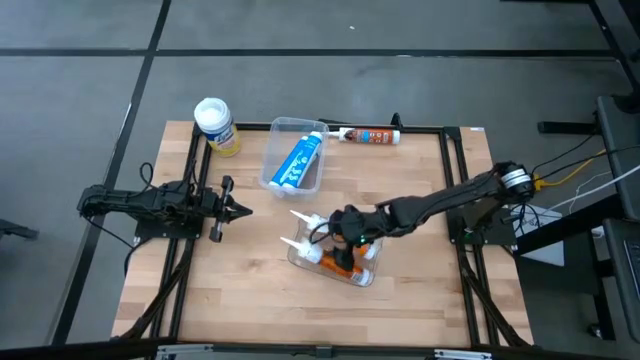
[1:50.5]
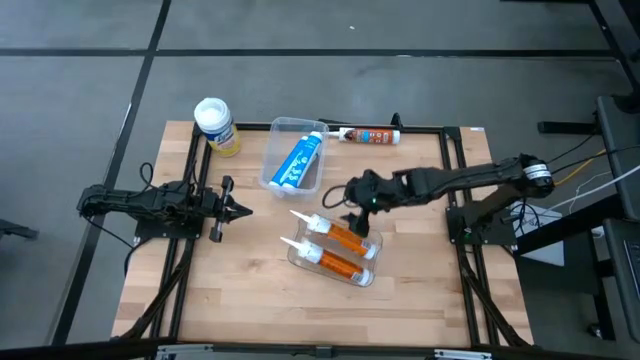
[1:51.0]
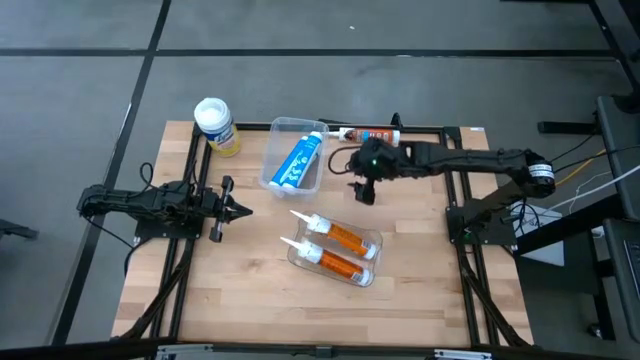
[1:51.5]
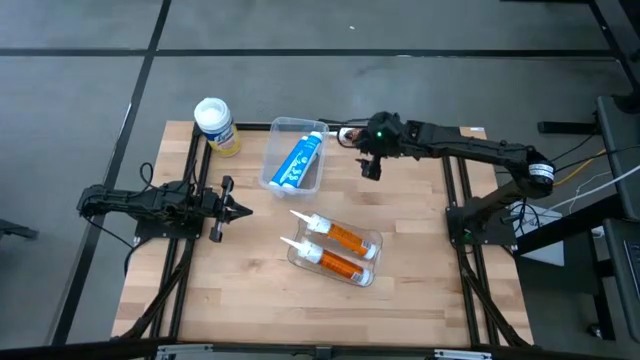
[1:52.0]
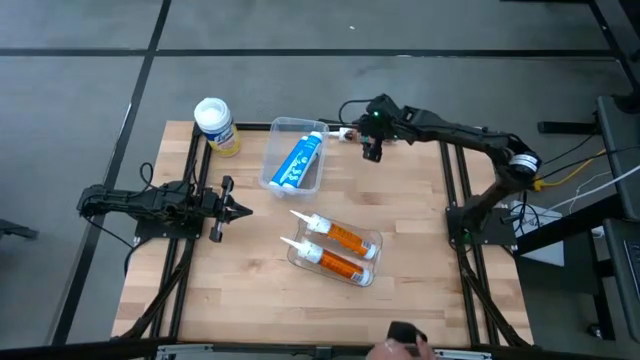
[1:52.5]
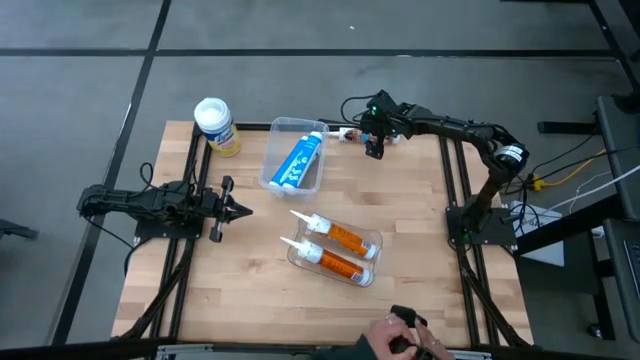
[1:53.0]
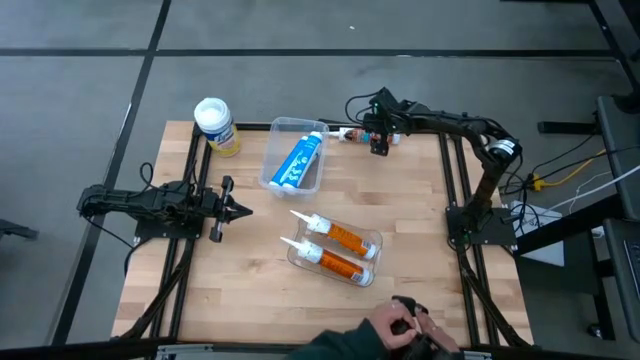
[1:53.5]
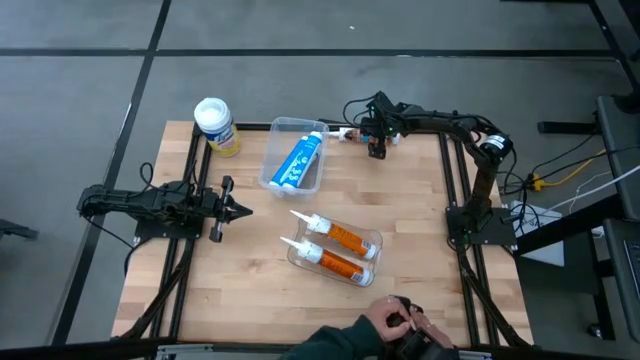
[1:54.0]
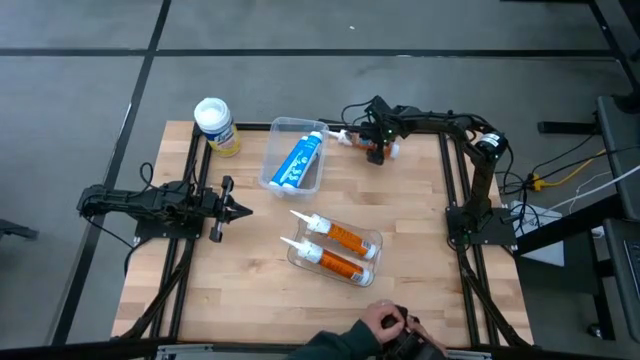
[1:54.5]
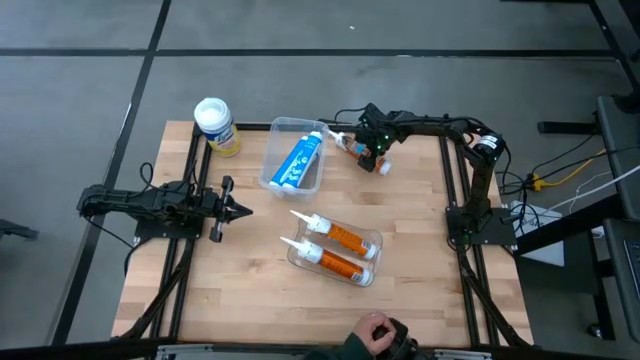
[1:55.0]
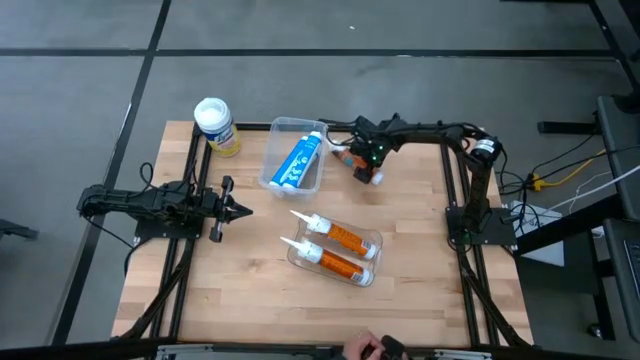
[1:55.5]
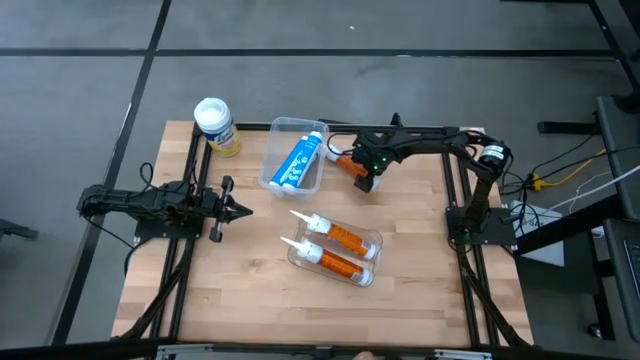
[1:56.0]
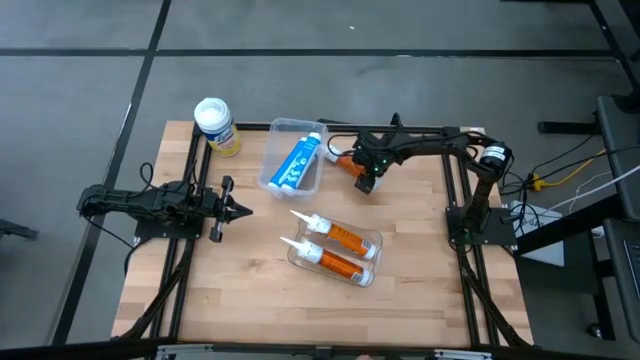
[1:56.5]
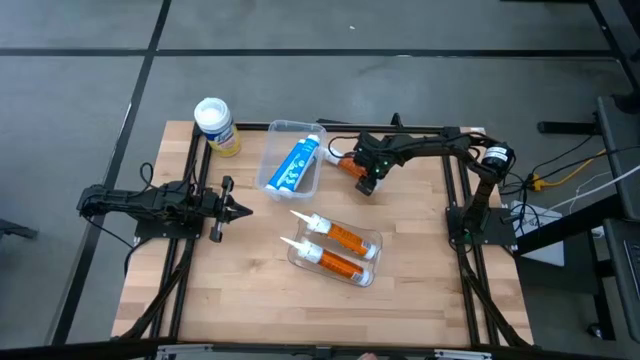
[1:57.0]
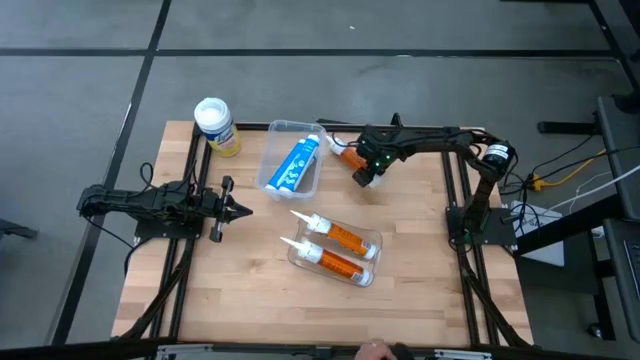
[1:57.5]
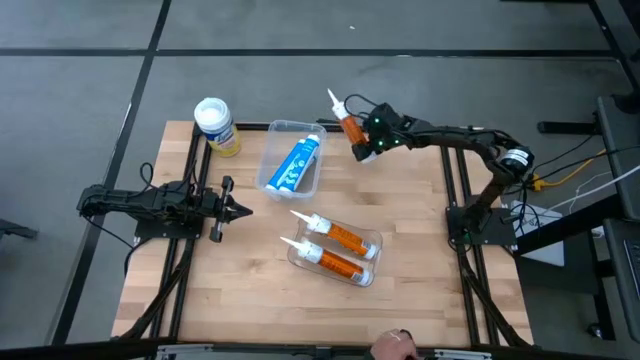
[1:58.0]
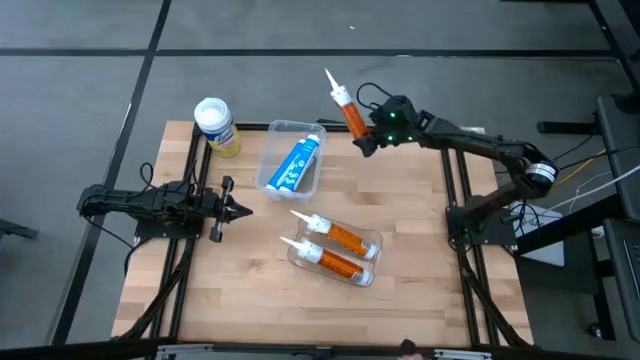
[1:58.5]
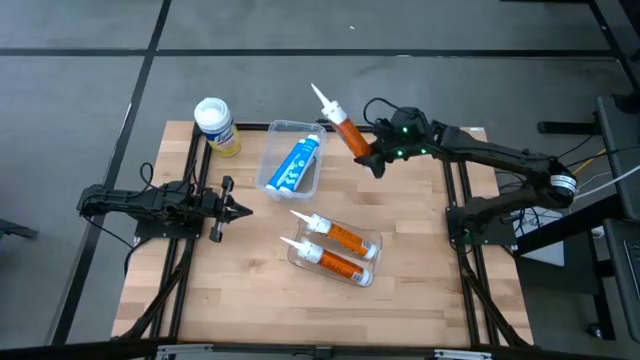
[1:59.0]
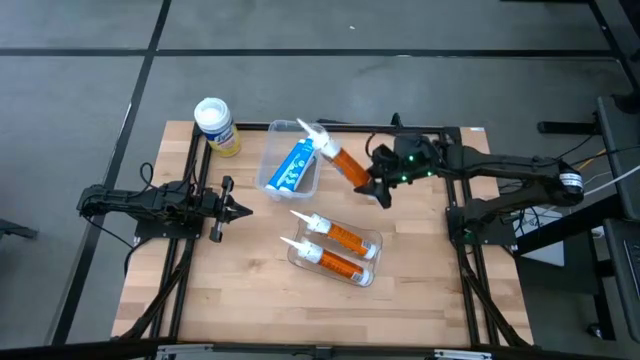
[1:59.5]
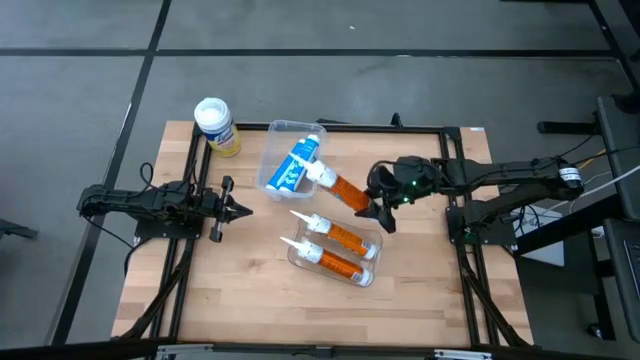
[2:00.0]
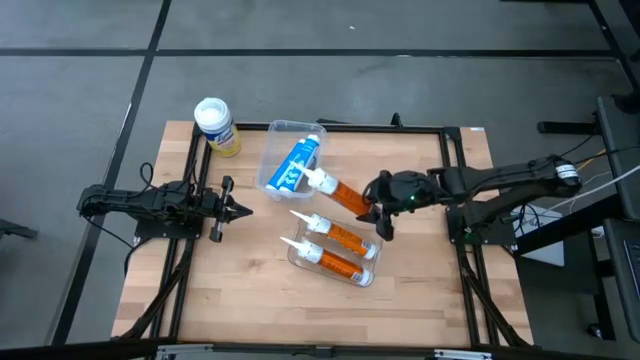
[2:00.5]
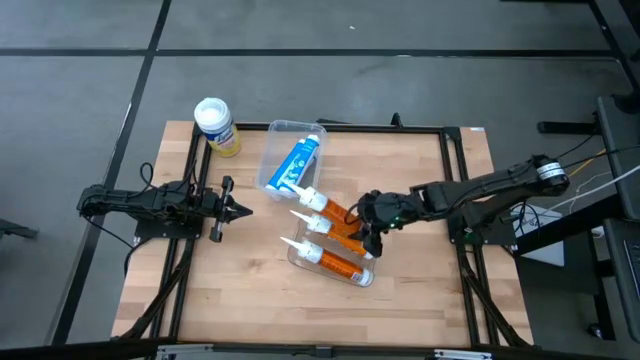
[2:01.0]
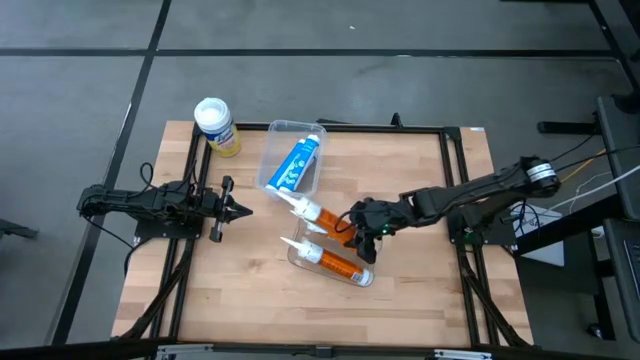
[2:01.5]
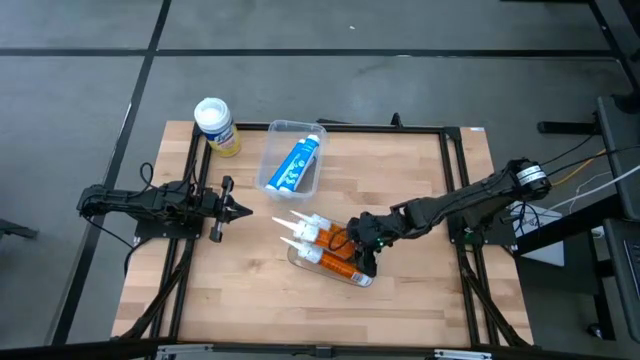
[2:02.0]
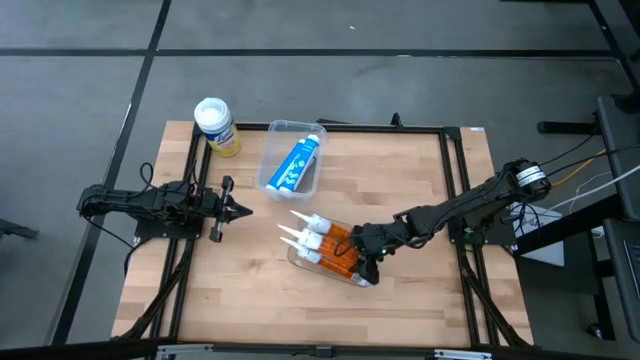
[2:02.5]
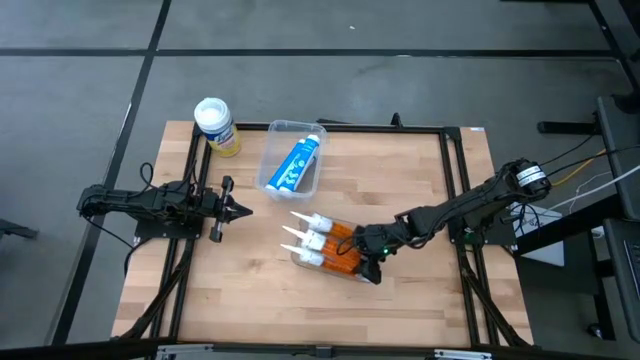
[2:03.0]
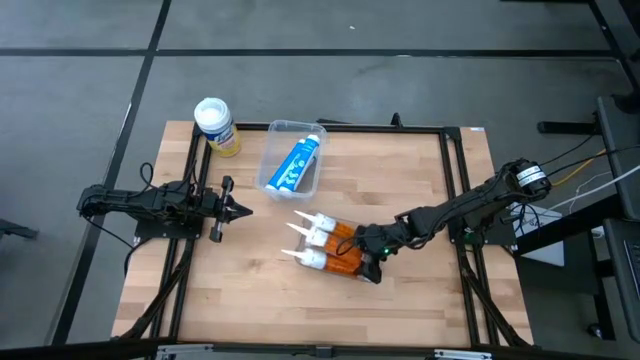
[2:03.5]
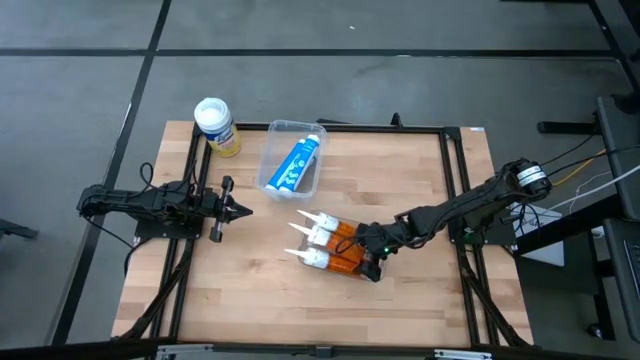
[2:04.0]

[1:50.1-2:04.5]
Task: Pick & place silicon tubes, Sealant and Lysol wipes
Put the orange sealant into the bottom transparent bin

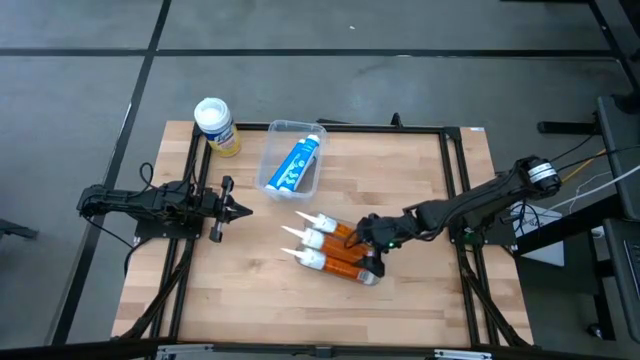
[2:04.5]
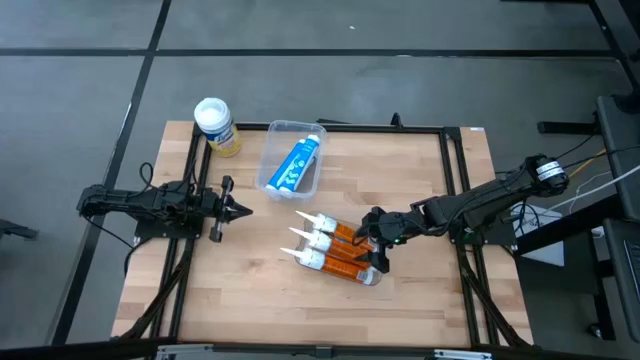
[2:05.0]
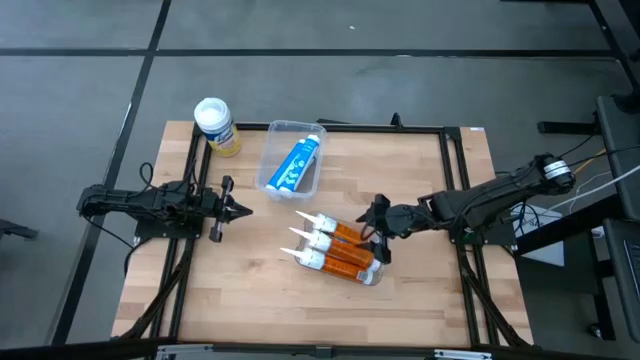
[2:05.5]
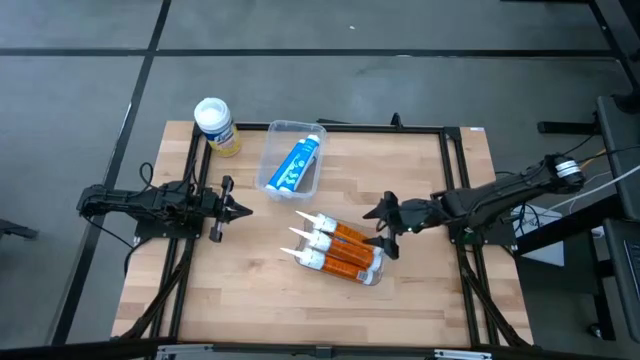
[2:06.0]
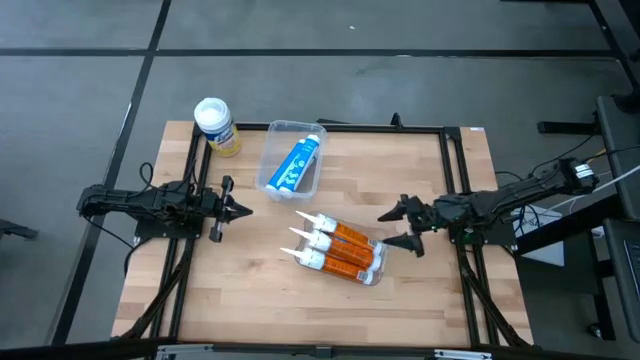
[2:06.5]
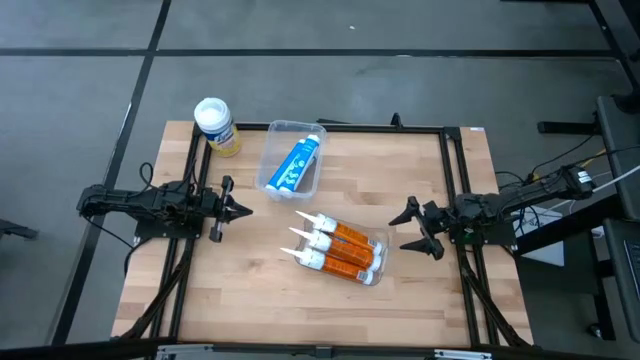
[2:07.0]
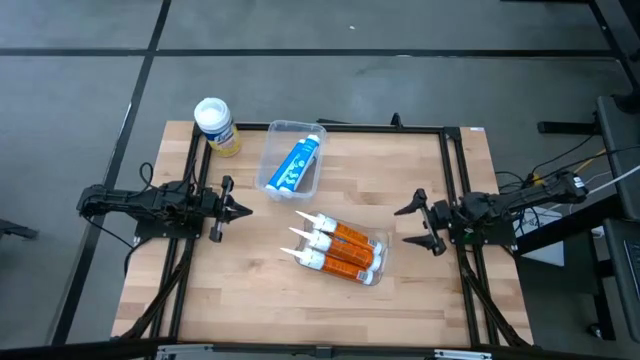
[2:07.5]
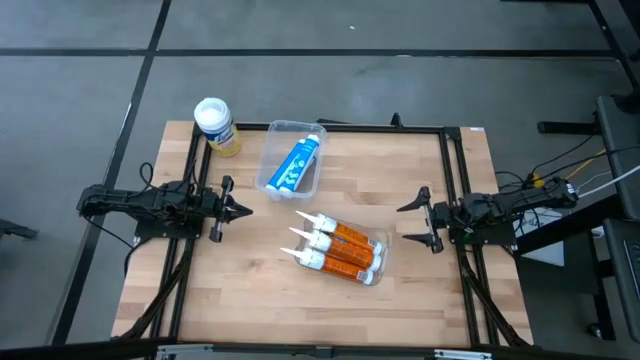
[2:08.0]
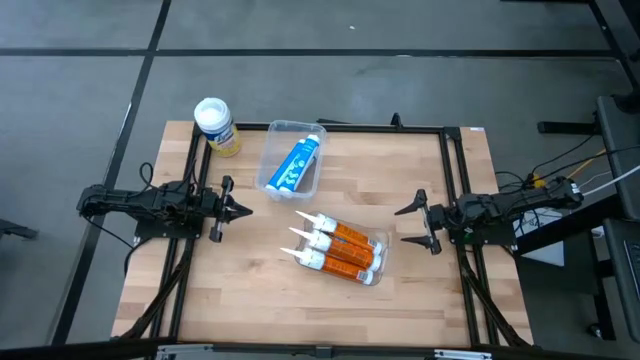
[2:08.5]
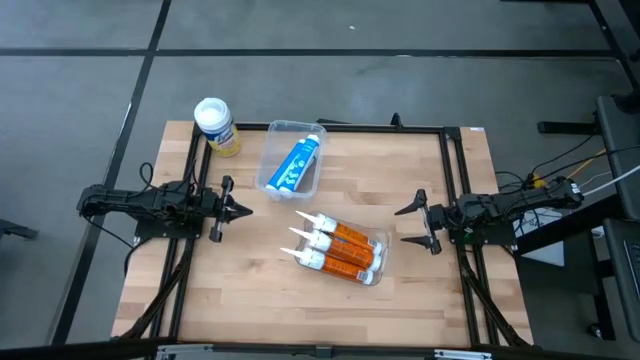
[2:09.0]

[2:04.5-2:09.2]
Return to Home Position

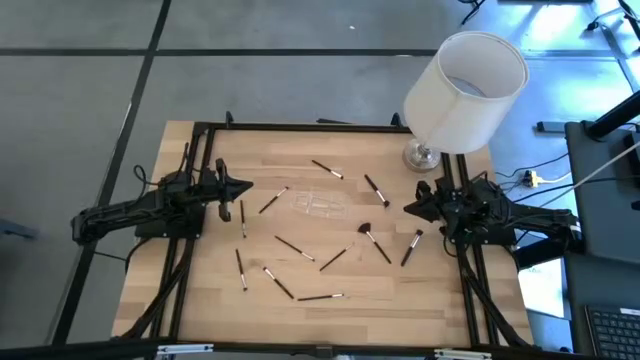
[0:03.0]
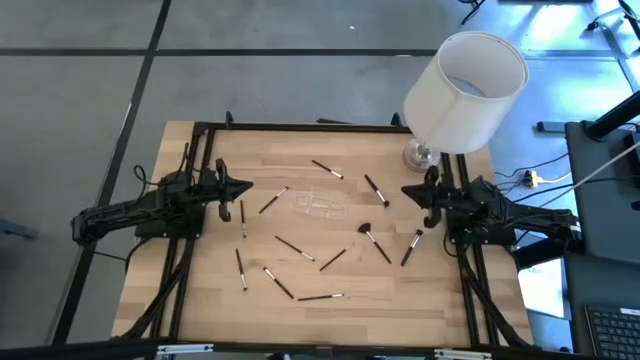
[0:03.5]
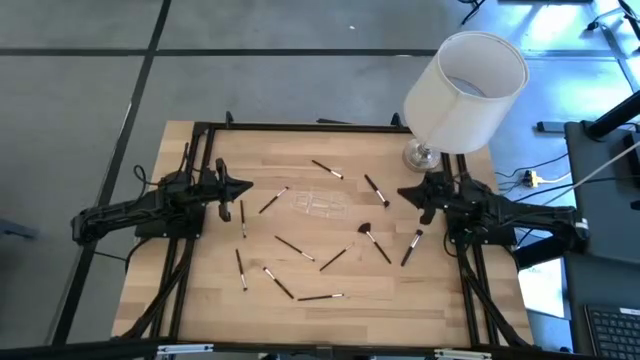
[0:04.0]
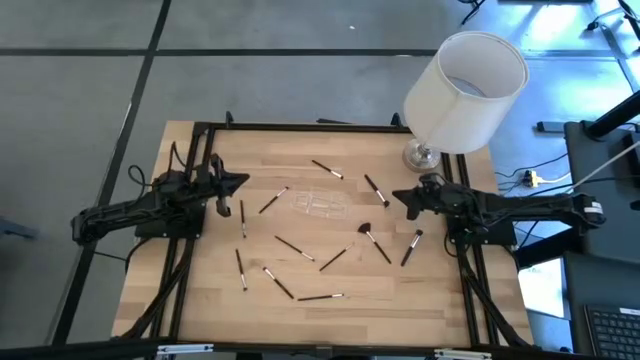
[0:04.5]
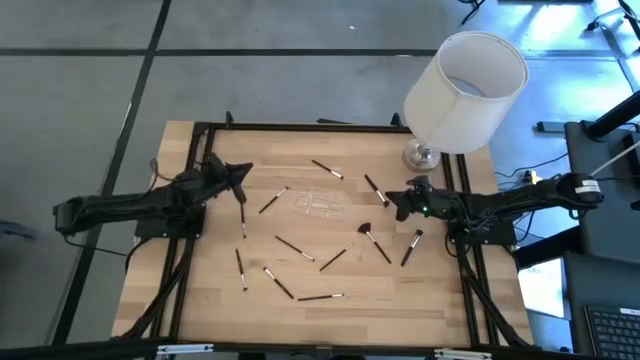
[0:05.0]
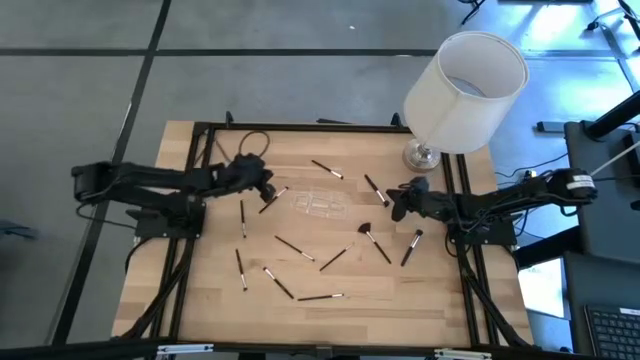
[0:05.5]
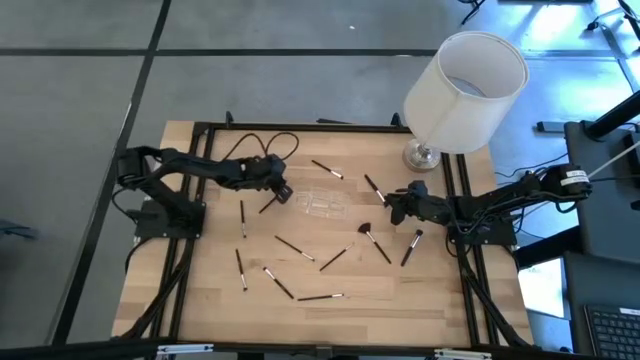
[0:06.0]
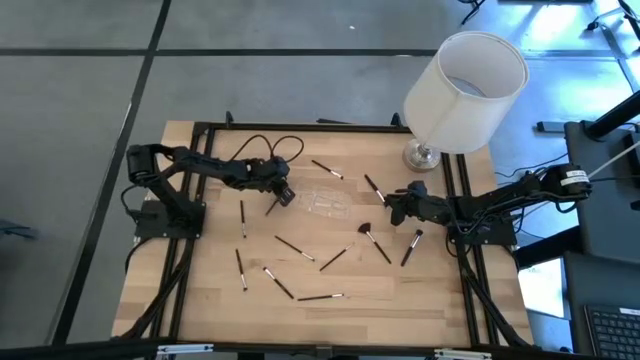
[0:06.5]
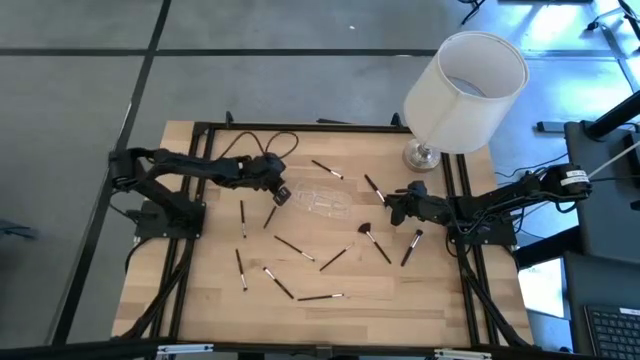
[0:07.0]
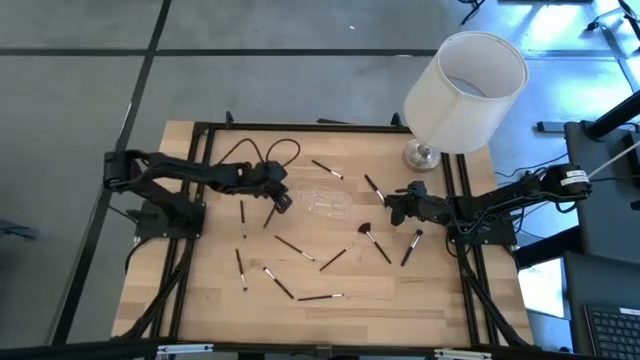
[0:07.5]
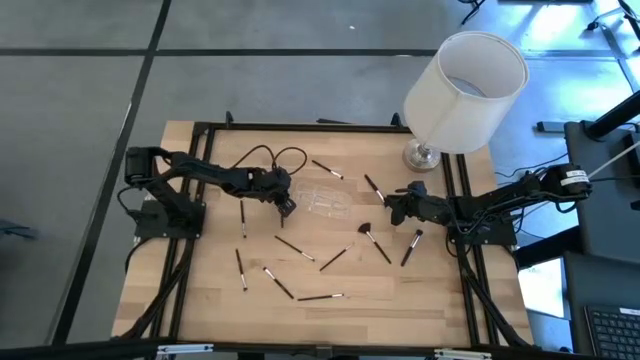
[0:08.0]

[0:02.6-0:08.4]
Task: Put items in baskets/containers
Put the eyeshadow brush into the transparent organizer
